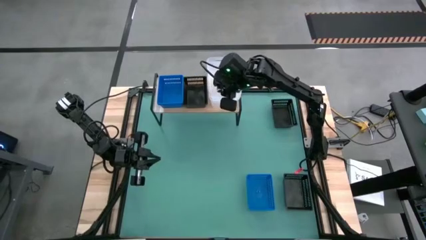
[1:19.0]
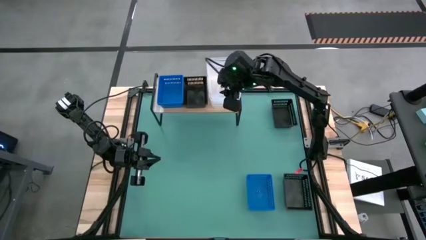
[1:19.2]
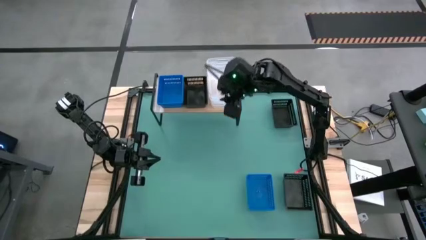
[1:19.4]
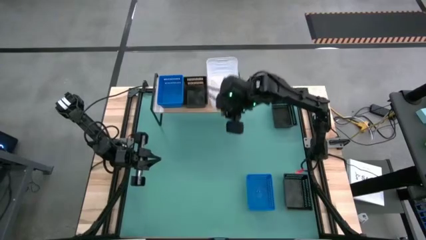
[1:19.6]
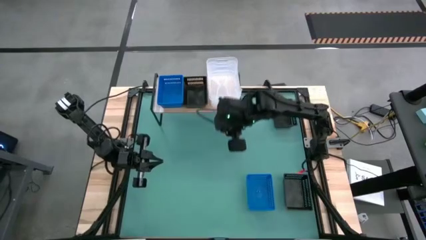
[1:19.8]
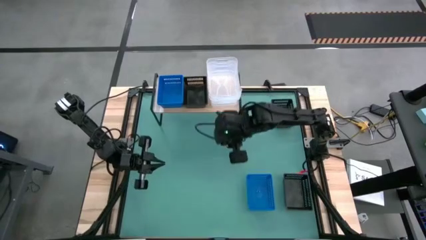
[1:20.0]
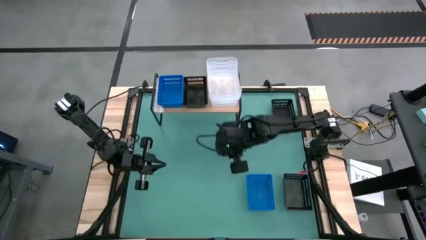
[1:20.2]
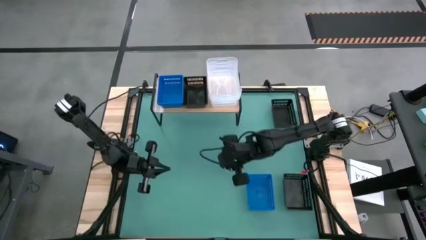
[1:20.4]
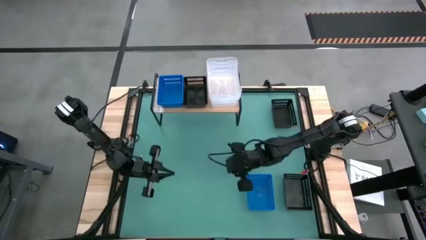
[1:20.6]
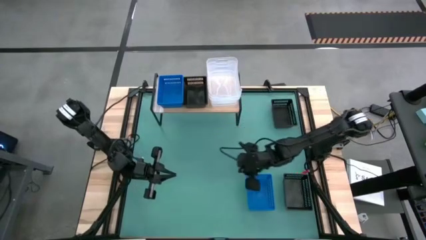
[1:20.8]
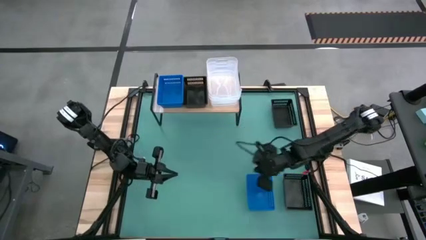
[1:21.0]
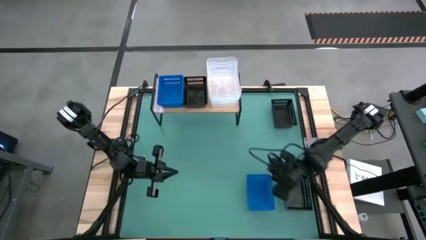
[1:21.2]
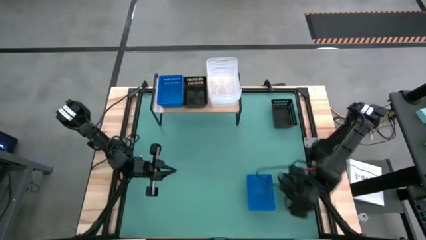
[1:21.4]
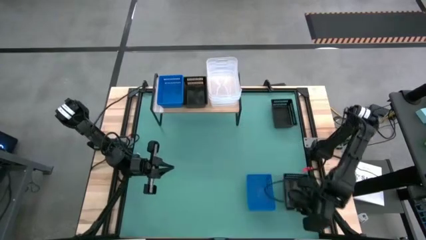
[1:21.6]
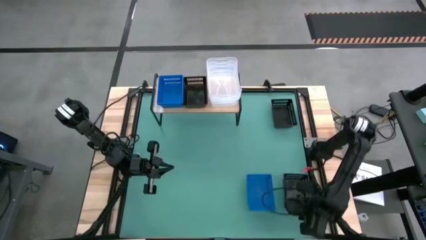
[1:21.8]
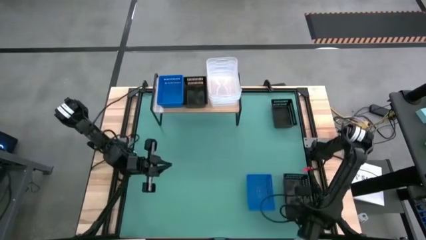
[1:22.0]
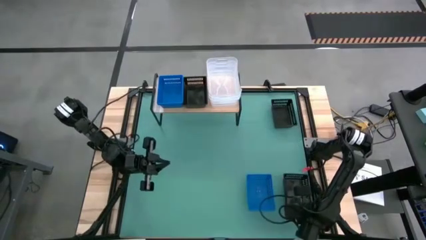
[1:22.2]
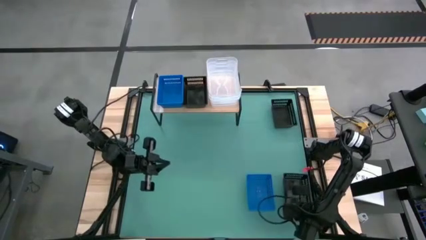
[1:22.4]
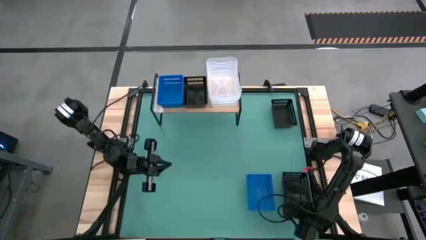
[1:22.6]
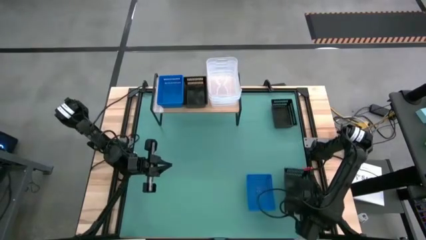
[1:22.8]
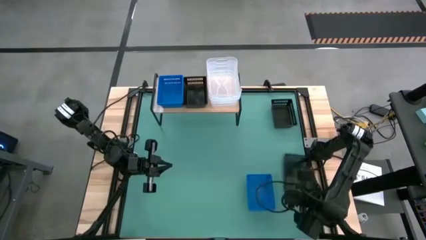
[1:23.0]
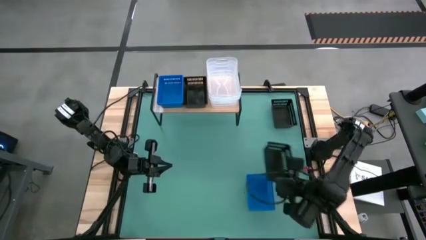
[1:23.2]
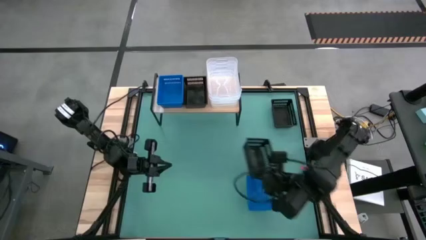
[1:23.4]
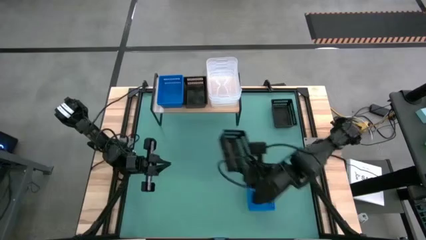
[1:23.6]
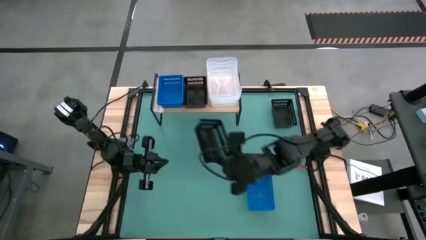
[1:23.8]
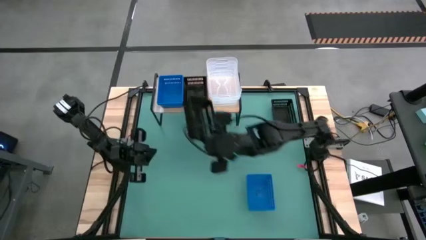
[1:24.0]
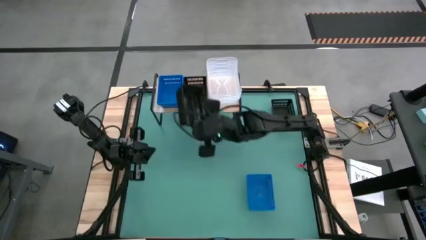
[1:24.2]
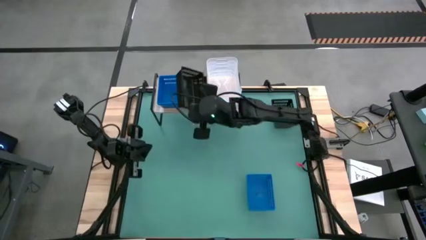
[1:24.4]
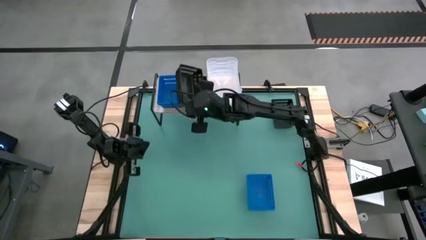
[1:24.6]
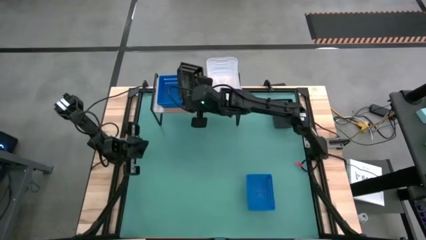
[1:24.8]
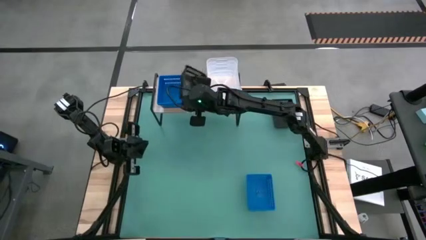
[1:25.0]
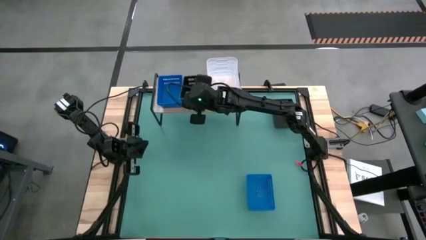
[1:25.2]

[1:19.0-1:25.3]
Task: Stack baskets on shelf by color
Stack the bottom black bin on the other black bin on the shelf

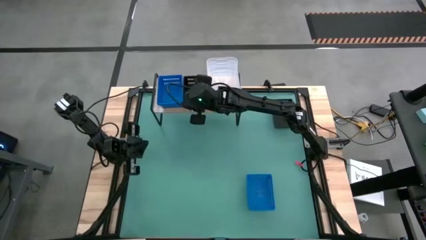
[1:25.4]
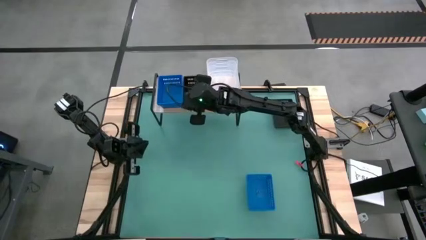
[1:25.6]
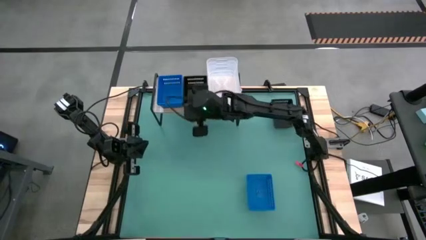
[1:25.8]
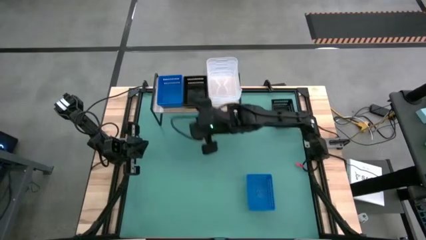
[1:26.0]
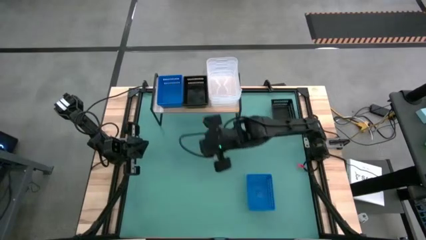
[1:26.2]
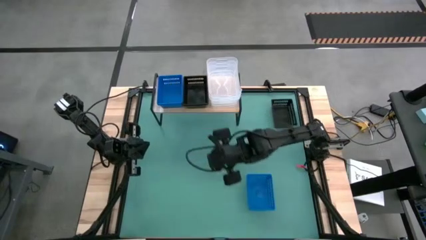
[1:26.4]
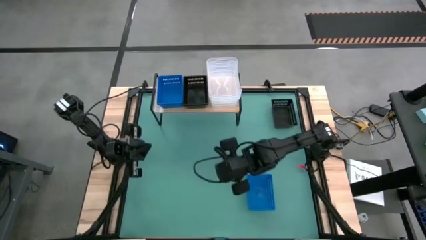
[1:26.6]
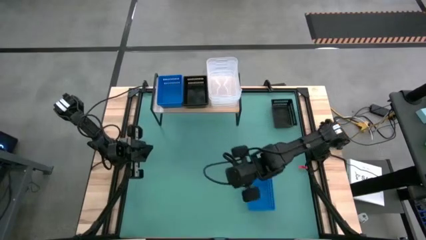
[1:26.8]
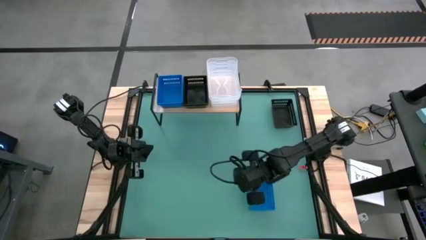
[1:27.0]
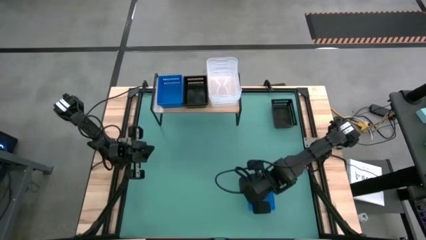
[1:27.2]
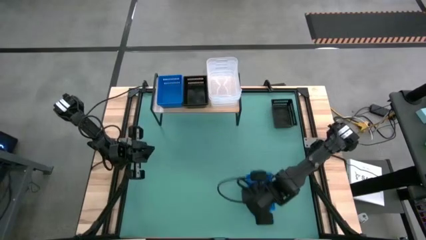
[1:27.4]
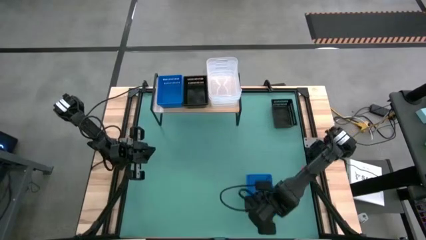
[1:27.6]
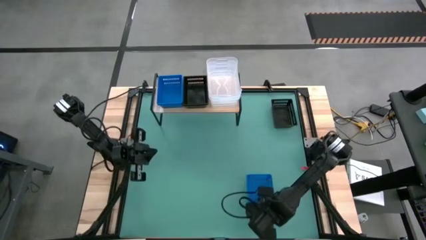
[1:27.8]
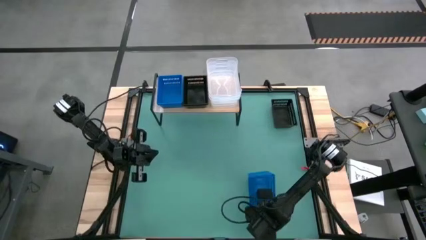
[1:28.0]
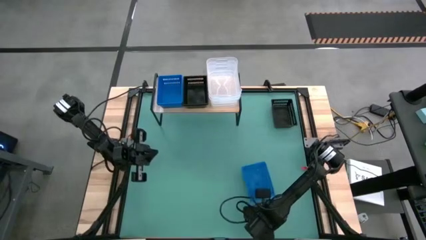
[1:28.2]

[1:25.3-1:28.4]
Stack the blue transparent bin on the other blue bins on the shelf

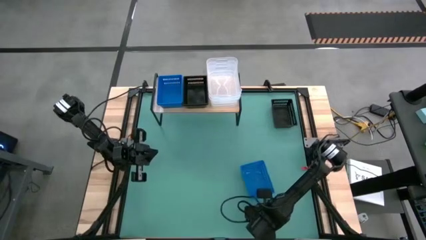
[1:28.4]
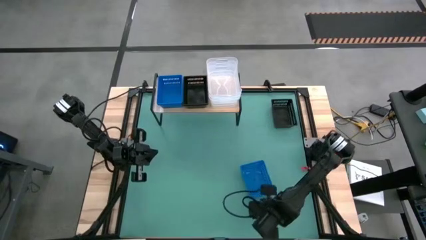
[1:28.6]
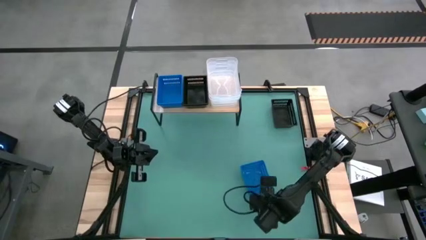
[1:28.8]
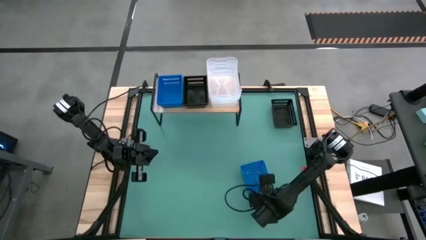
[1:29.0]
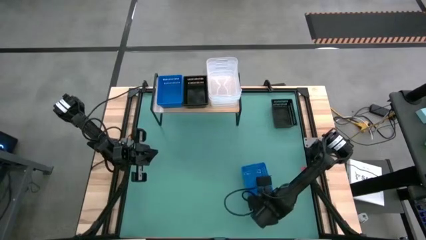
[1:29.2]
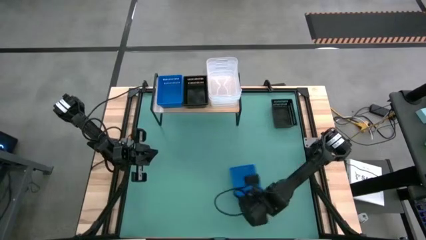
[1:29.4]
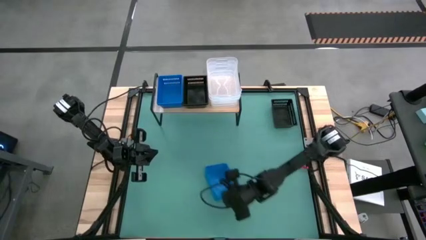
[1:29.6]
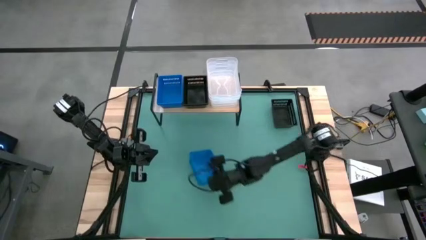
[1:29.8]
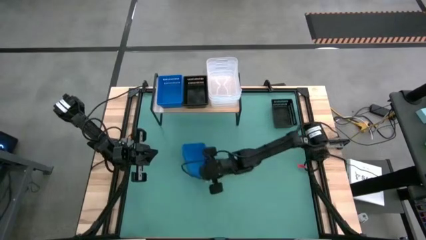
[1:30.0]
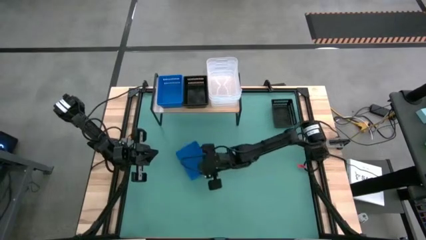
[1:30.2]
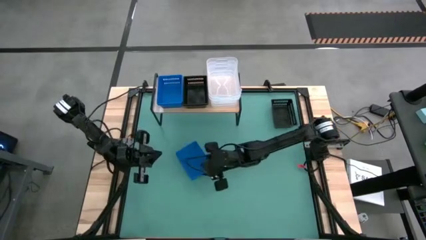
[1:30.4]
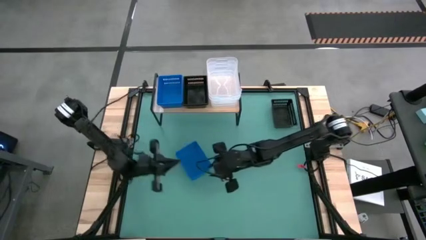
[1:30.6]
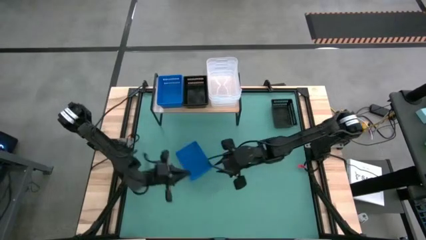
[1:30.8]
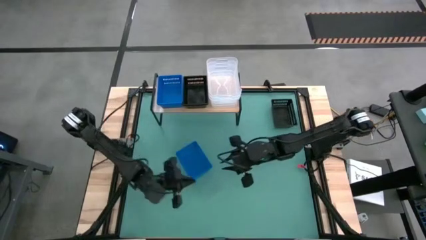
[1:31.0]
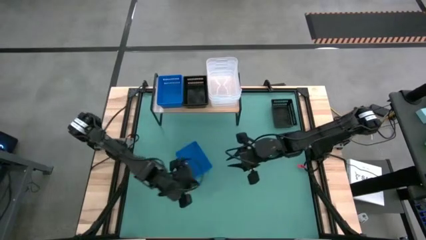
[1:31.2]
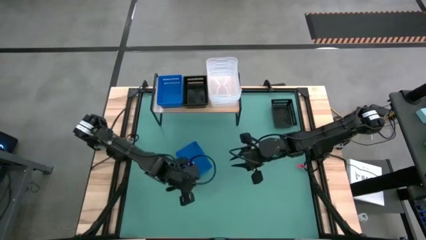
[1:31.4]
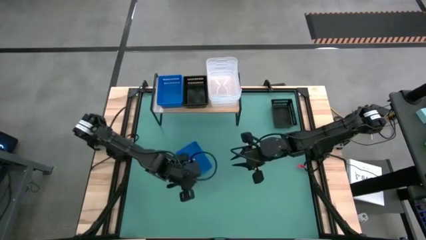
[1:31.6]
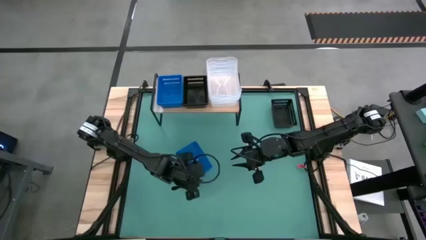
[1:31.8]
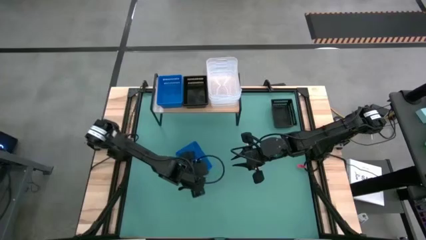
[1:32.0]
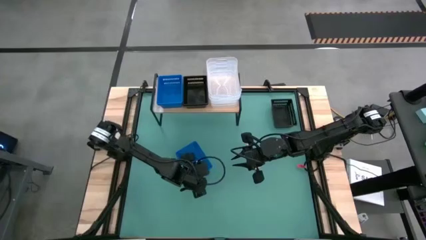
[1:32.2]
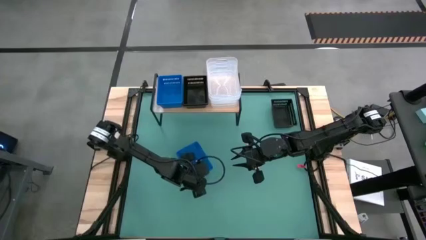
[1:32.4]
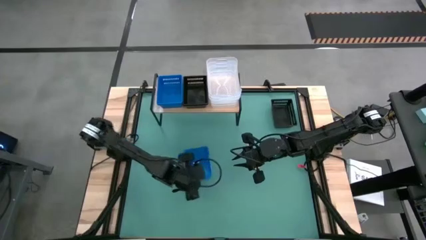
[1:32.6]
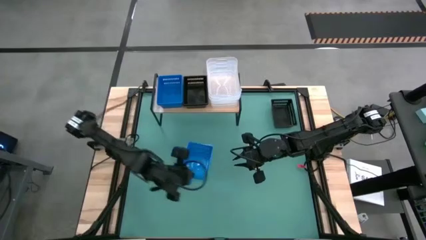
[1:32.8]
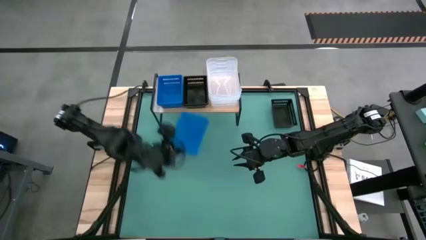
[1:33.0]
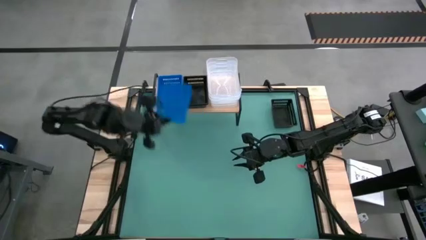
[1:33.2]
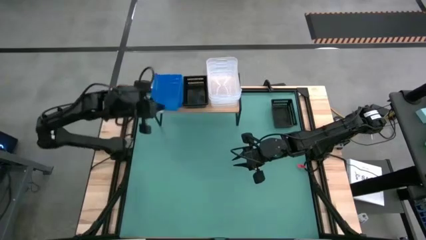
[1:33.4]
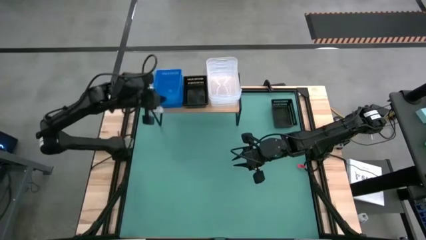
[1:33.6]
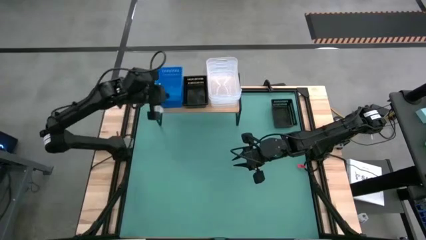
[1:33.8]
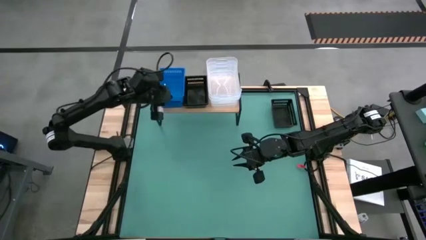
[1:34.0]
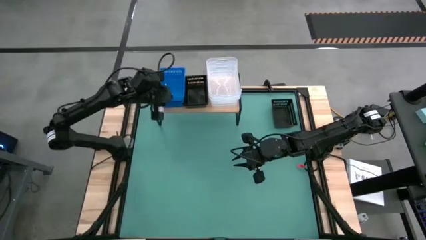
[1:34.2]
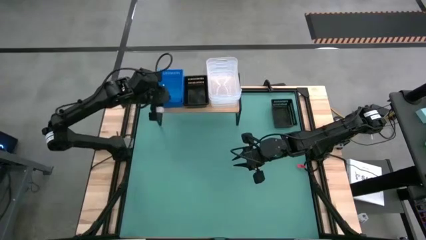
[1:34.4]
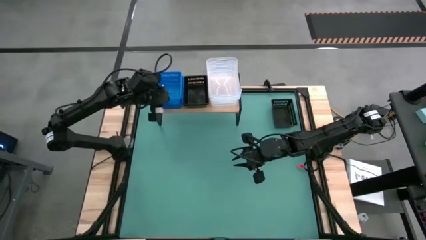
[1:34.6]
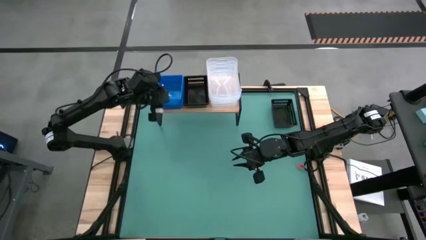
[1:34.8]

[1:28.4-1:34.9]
Stack the blue transparent bin on the other blue bins on the shelf
